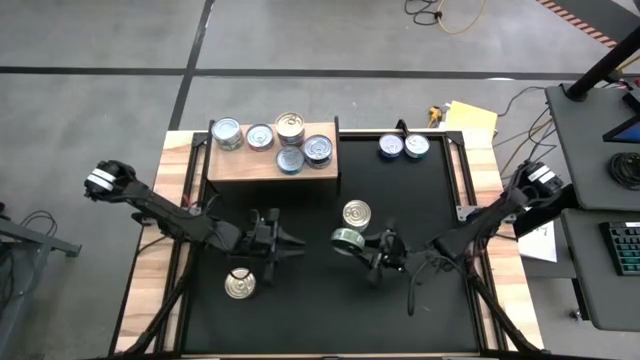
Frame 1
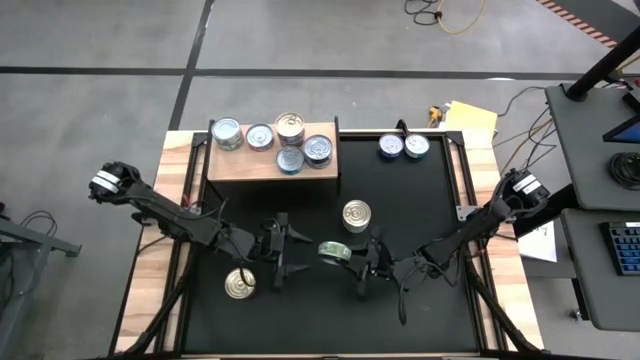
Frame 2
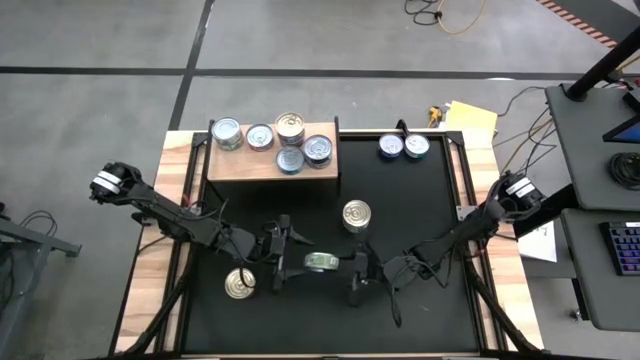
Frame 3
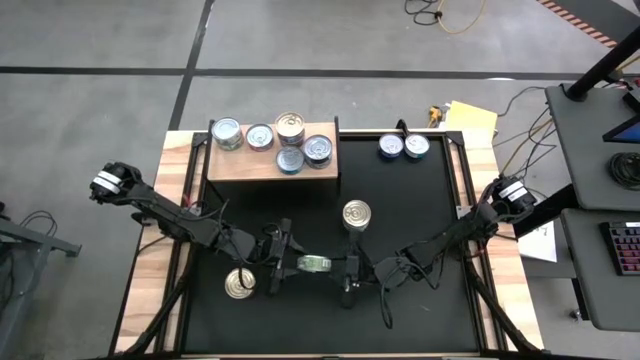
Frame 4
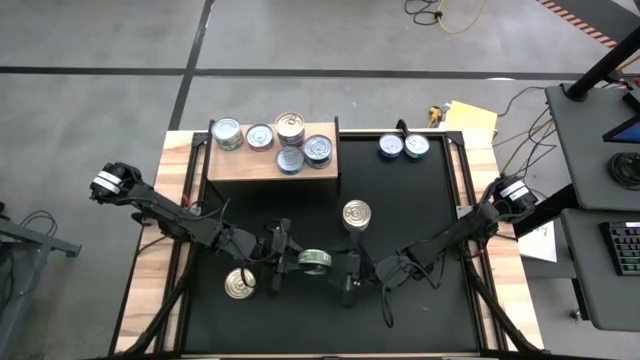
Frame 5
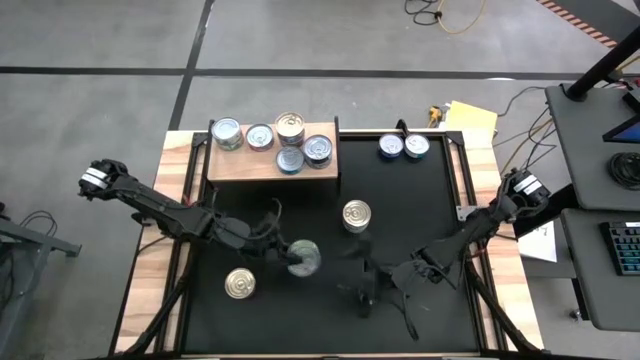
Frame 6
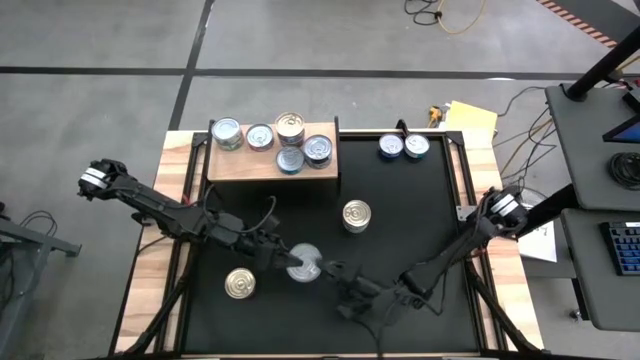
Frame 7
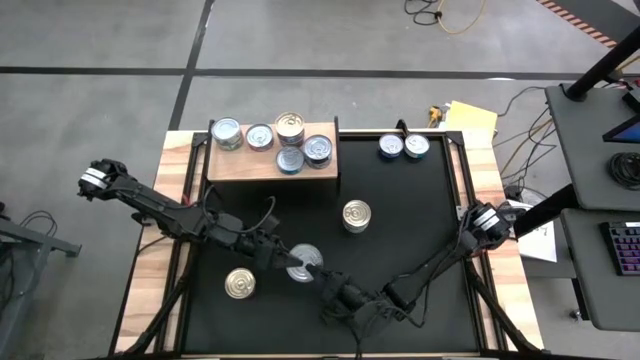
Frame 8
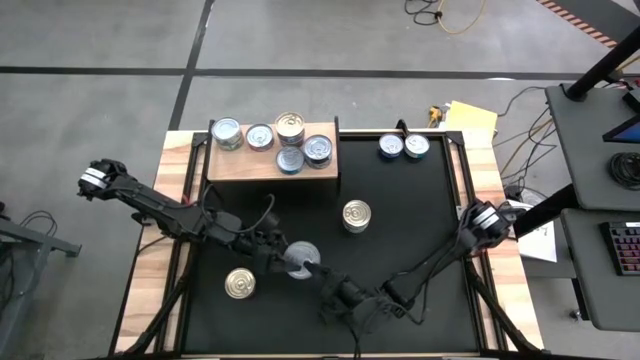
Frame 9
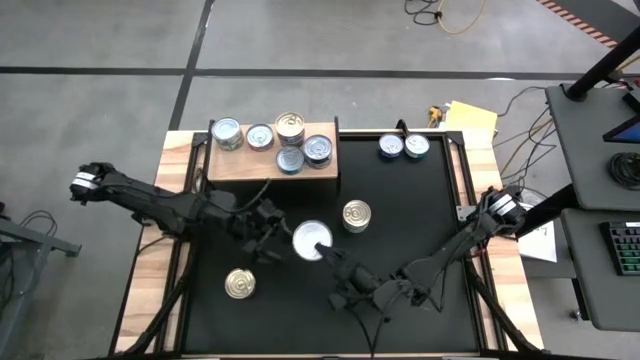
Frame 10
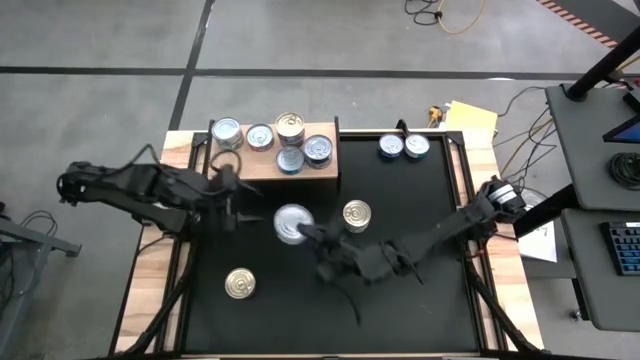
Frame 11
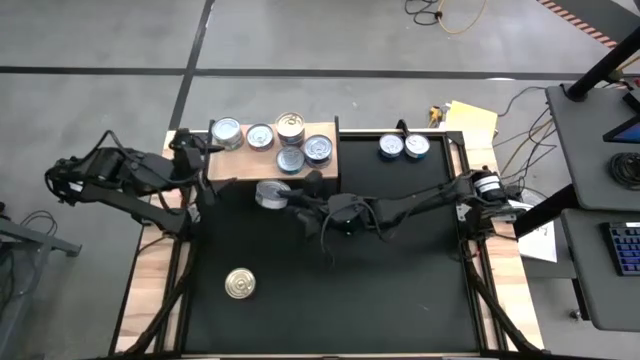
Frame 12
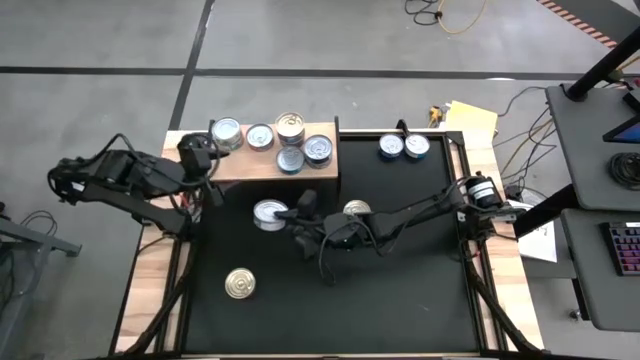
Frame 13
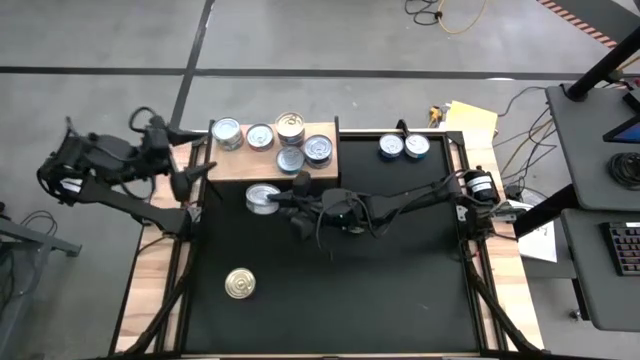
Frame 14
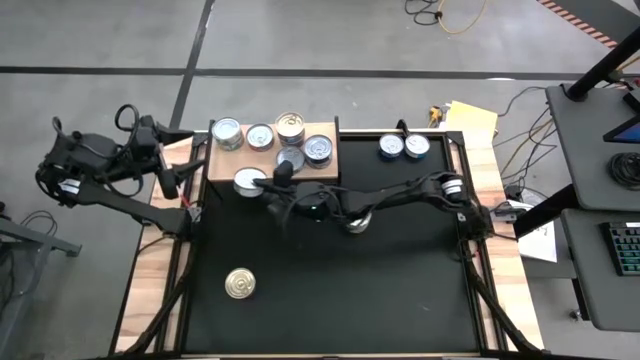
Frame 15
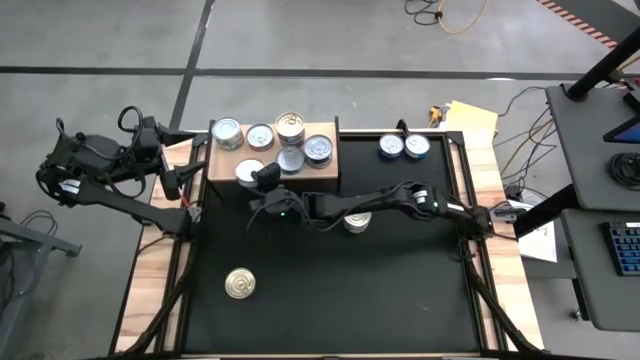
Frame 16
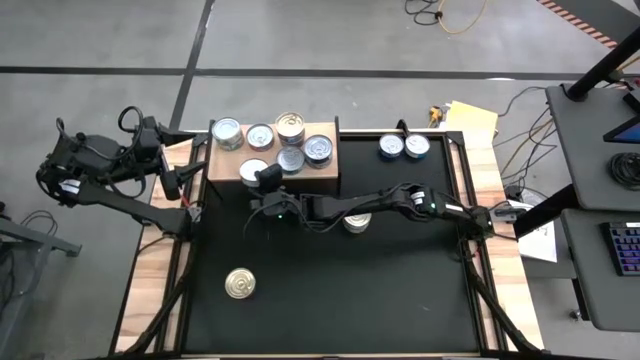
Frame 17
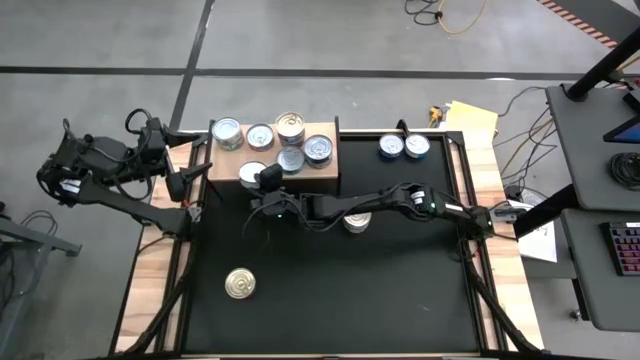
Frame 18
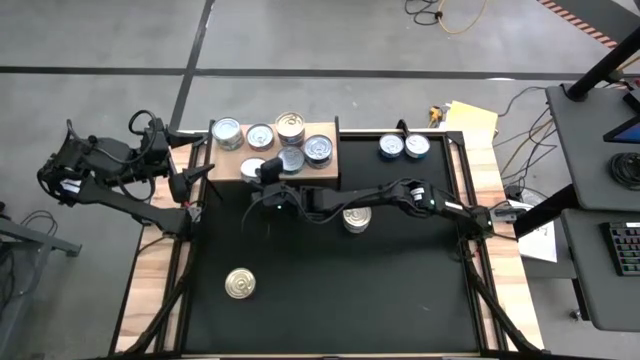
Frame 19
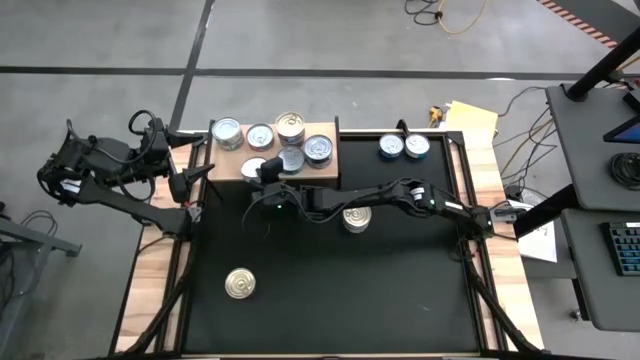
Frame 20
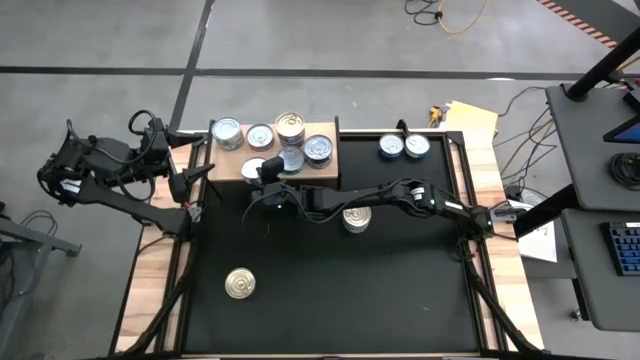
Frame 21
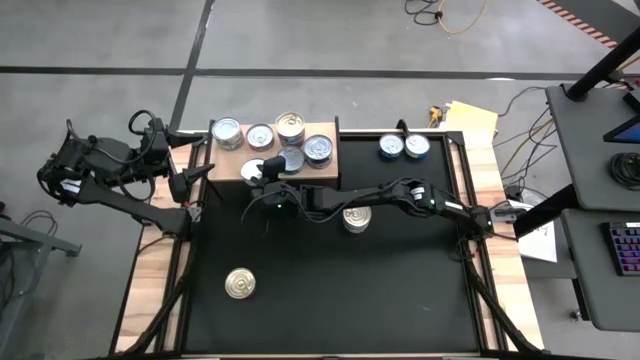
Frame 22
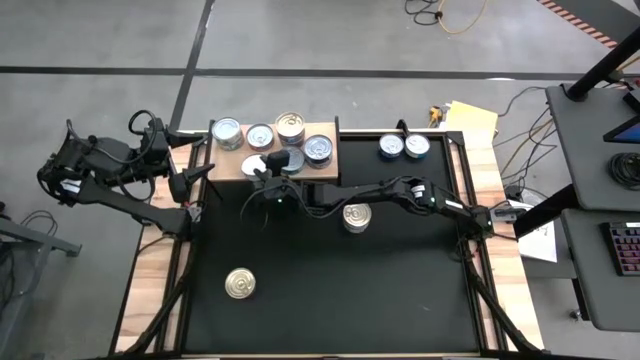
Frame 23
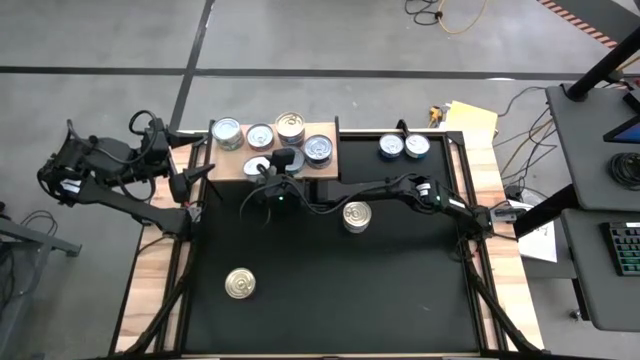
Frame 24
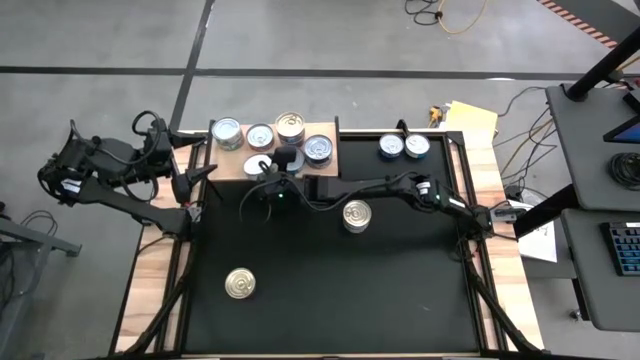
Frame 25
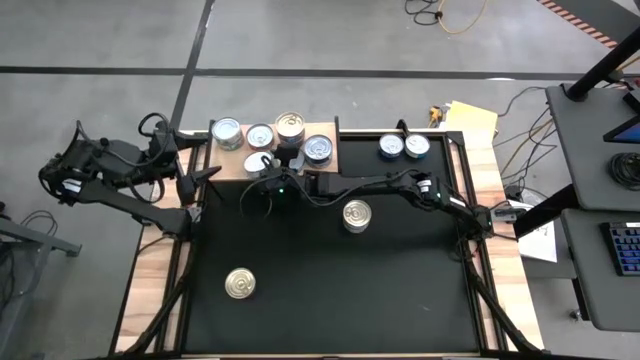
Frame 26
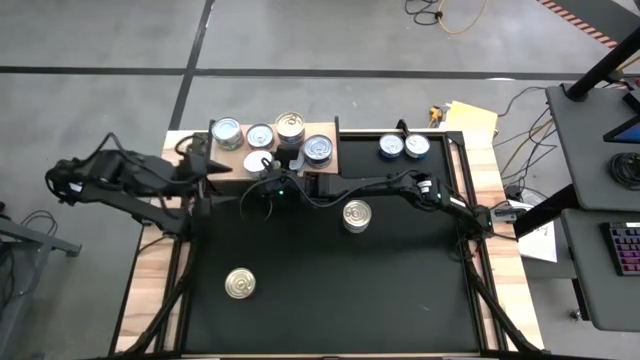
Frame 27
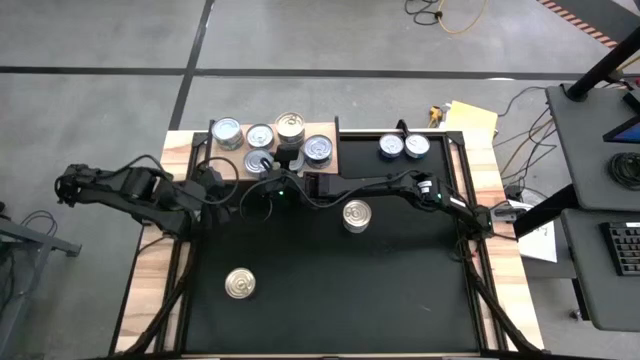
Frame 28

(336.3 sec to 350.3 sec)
Task: Stack canned seafood by type on shelf
Put the green tuna can on the shelf

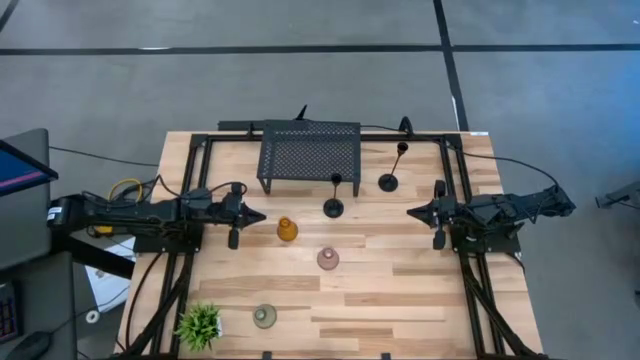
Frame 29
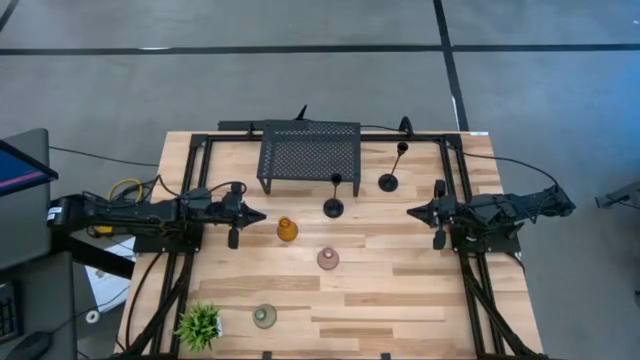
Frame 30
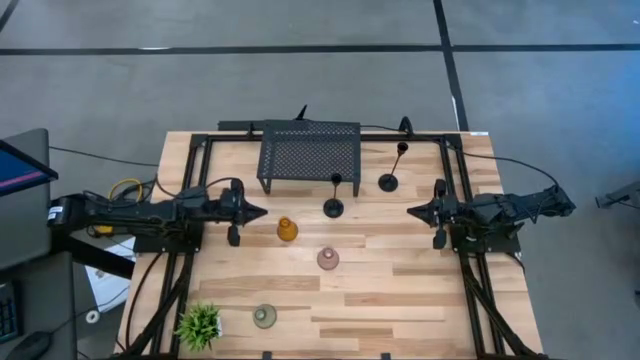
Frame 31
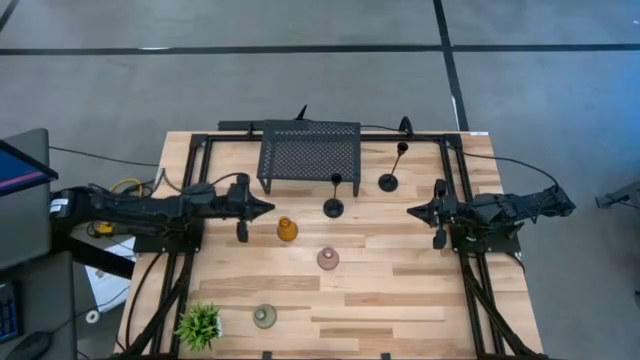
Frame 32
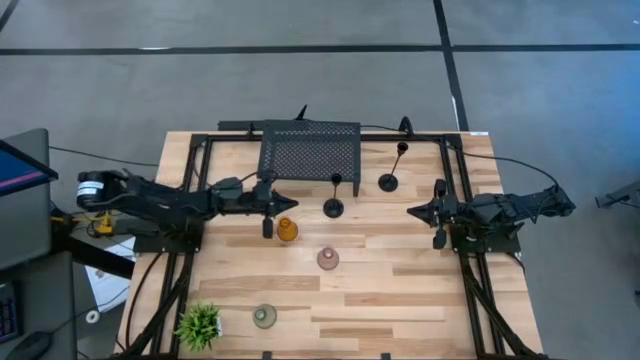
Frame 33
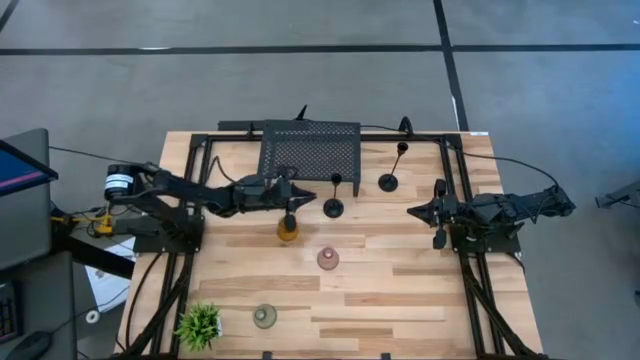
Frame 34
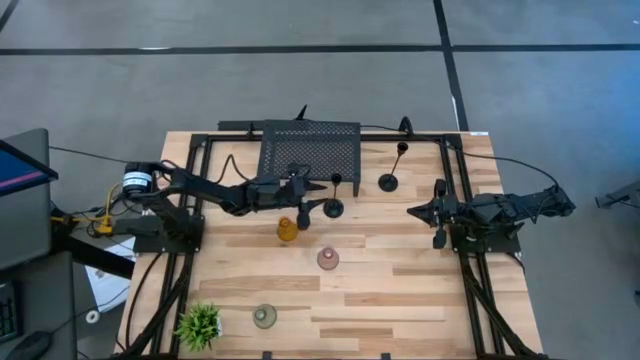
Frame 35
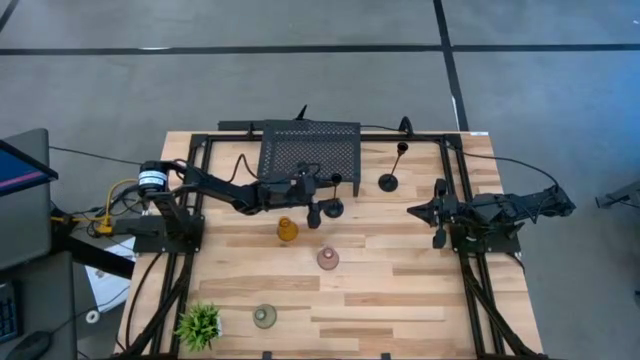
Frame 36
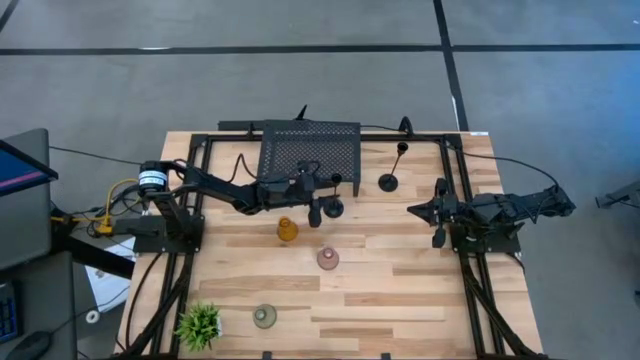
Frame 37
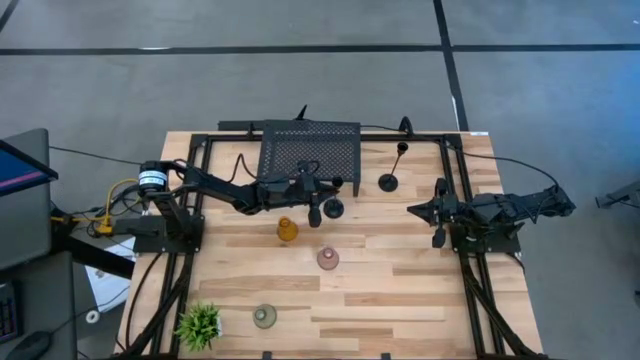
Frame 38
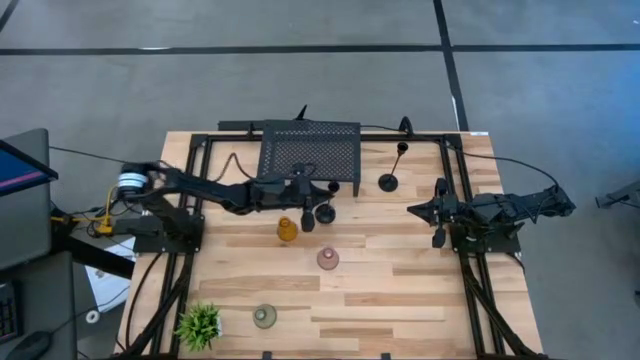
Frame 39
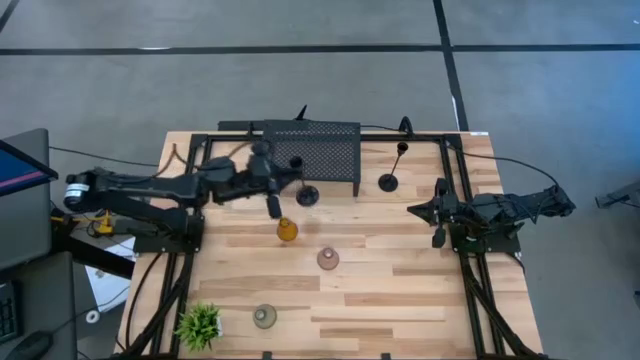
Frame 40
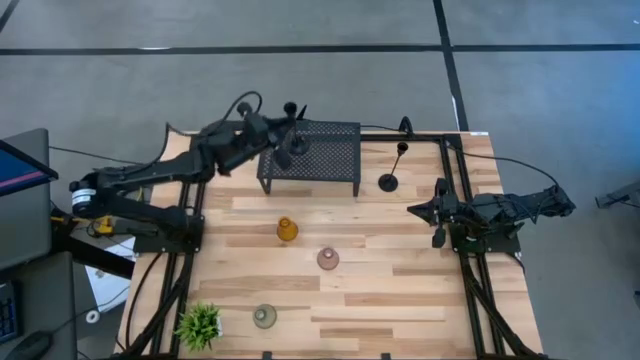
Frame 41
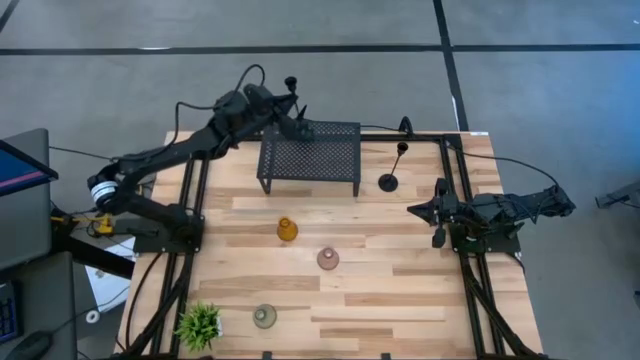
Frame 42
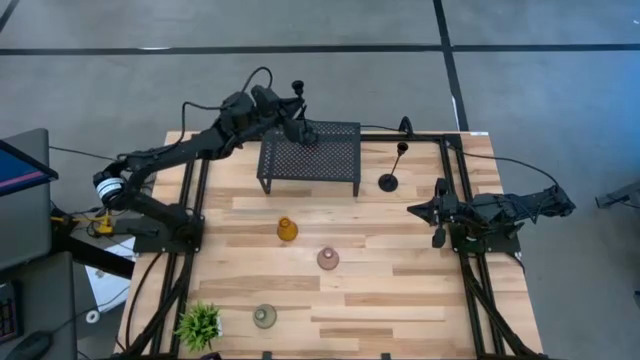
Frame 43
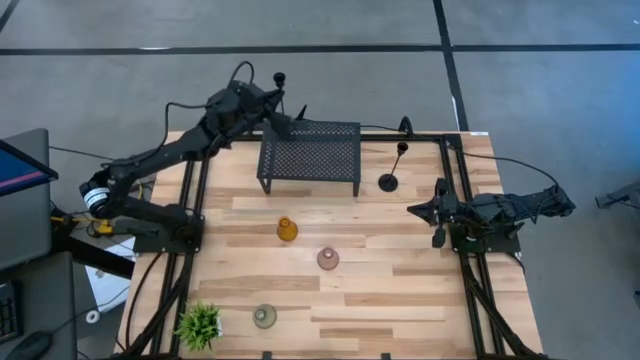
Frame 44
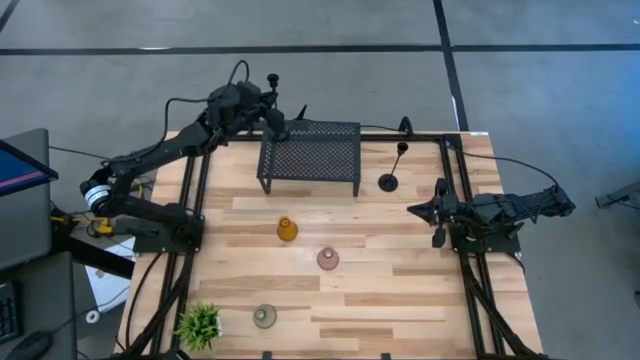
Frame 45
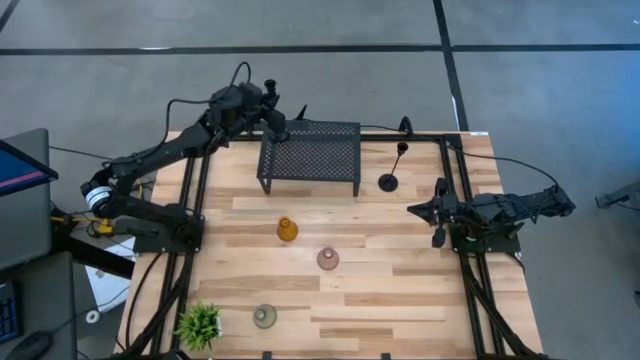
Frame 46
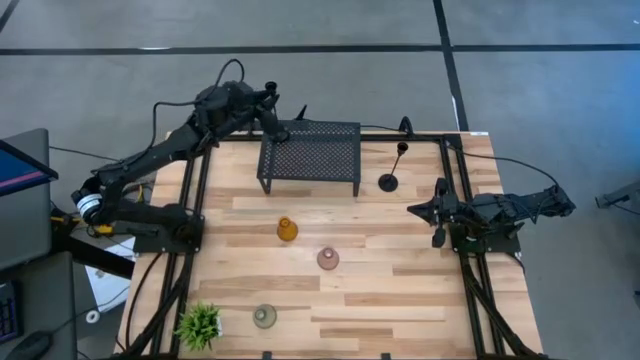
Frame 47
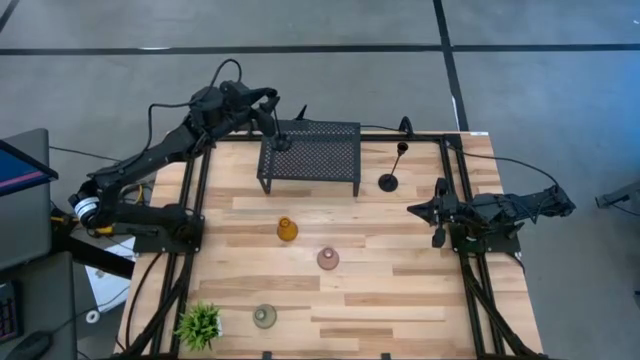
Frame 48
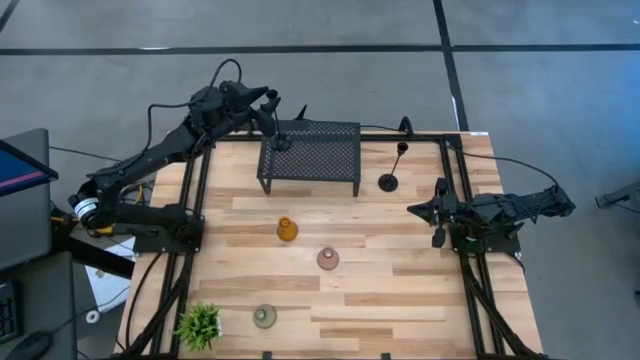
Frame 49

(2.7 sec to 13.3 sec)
Task: Pick & Place candle stick holders
Put the bottom black candle holder on the shelf
